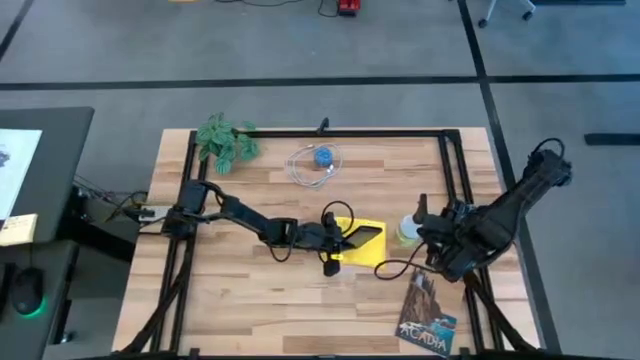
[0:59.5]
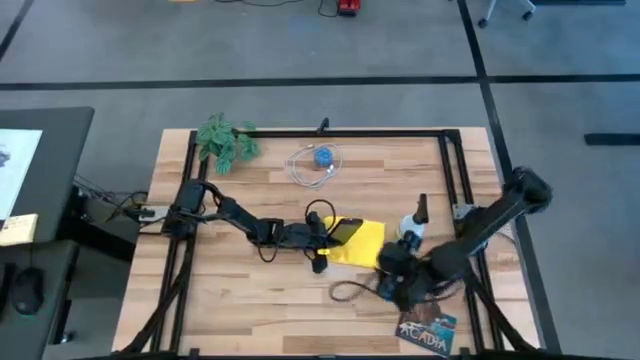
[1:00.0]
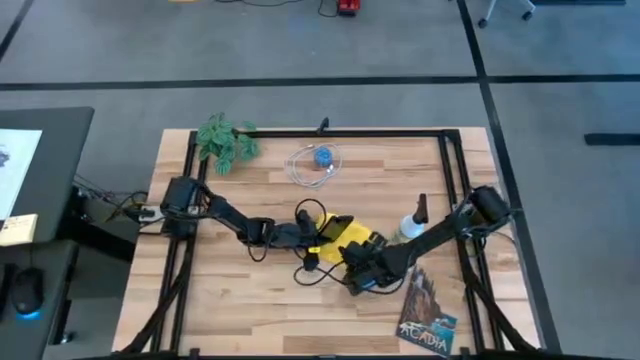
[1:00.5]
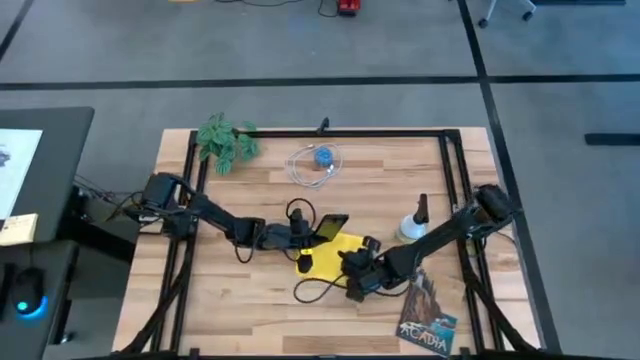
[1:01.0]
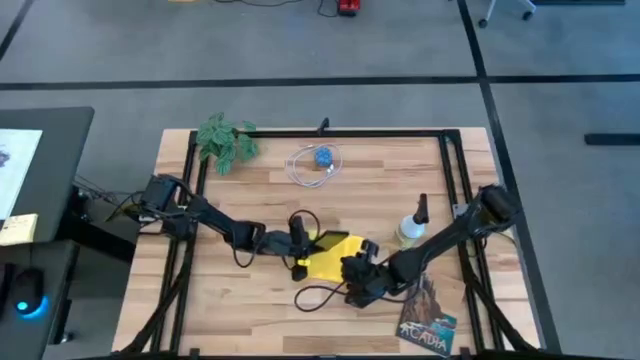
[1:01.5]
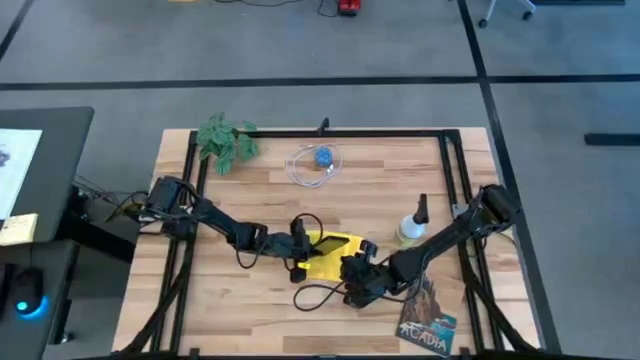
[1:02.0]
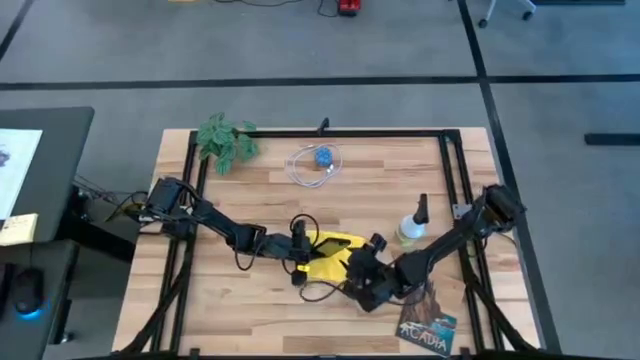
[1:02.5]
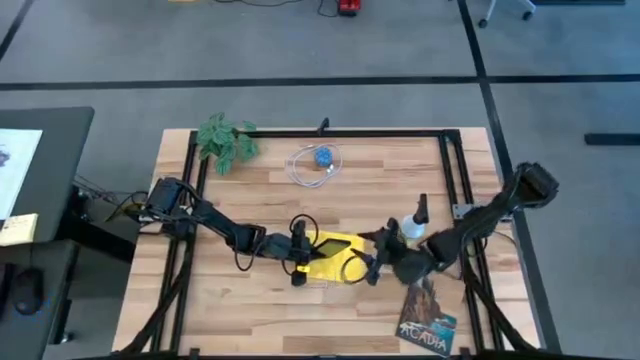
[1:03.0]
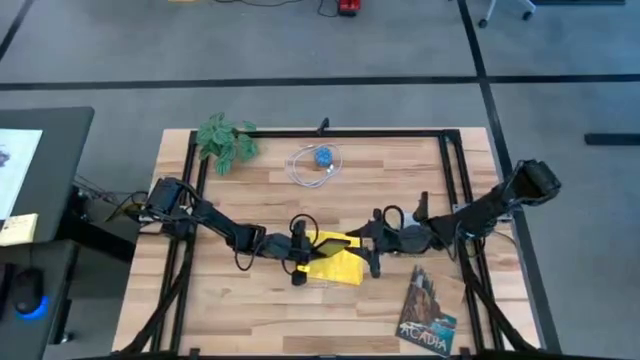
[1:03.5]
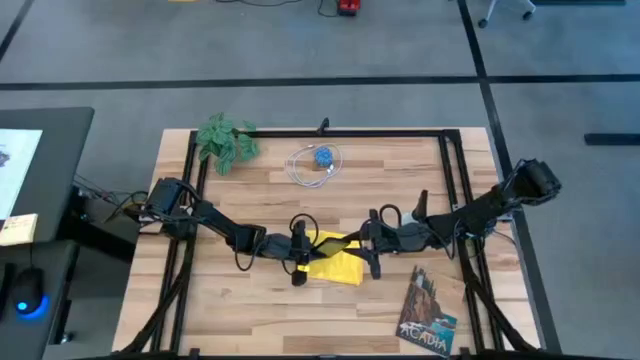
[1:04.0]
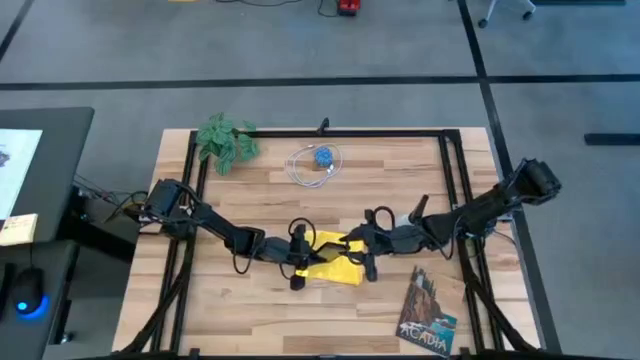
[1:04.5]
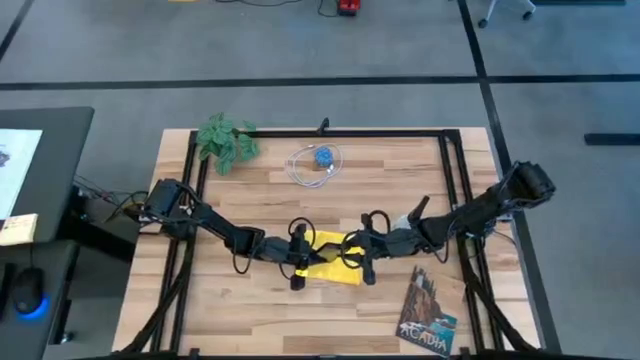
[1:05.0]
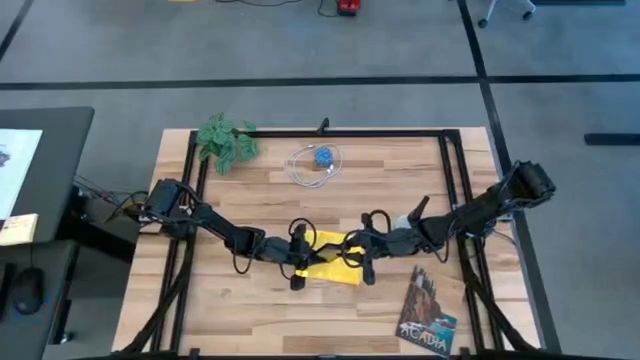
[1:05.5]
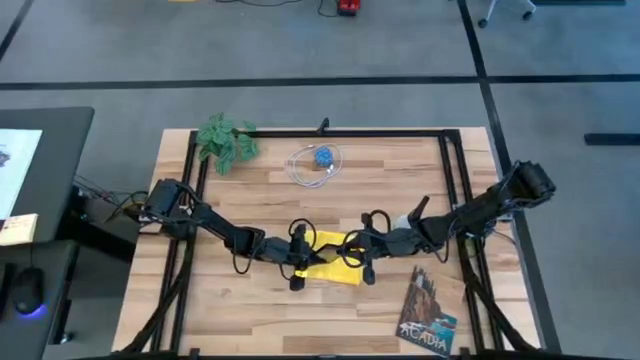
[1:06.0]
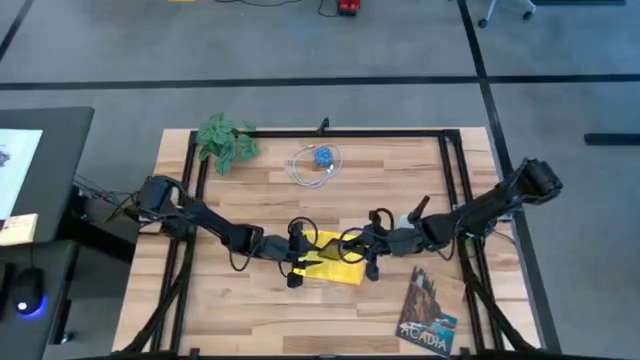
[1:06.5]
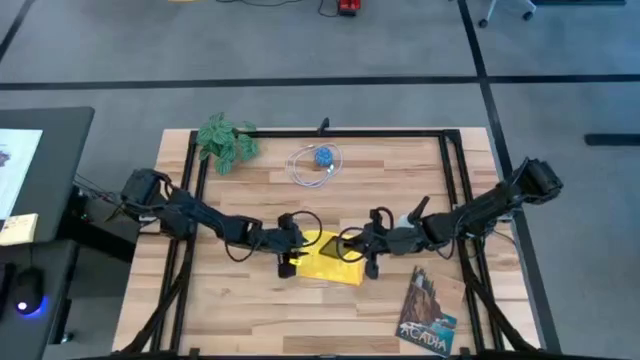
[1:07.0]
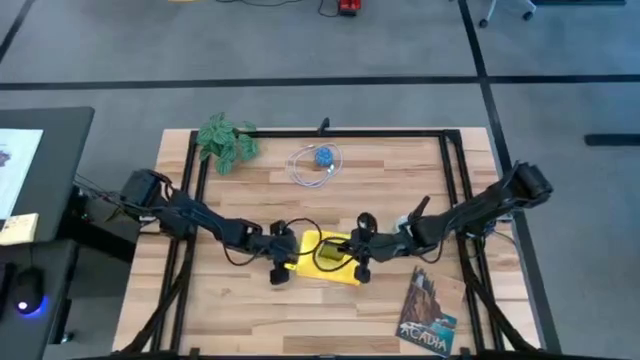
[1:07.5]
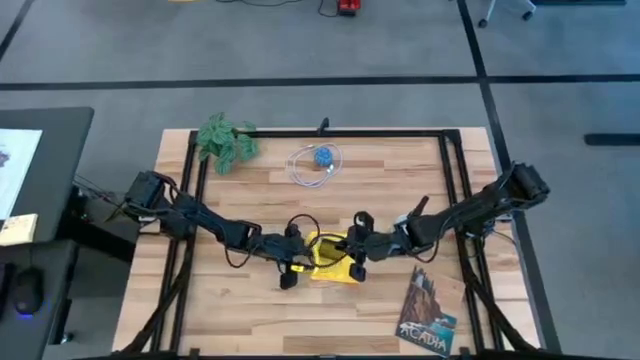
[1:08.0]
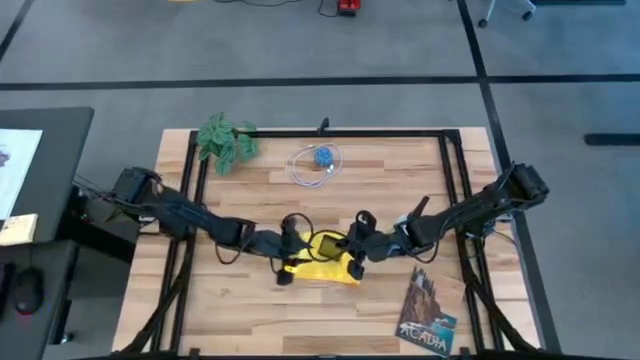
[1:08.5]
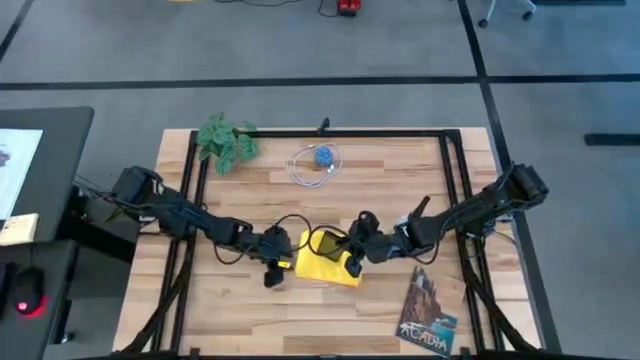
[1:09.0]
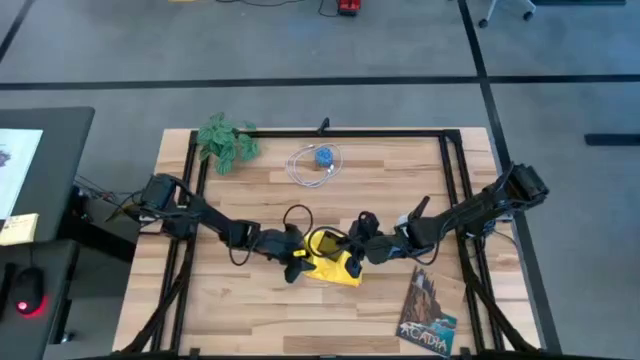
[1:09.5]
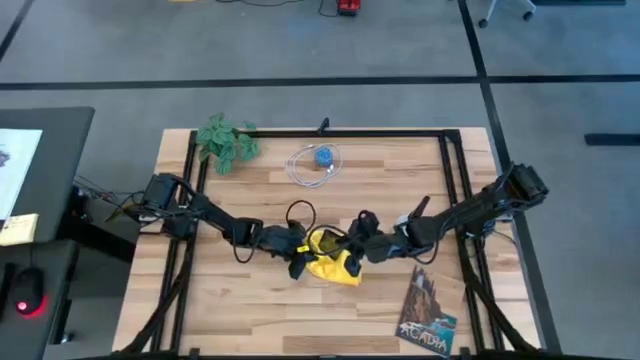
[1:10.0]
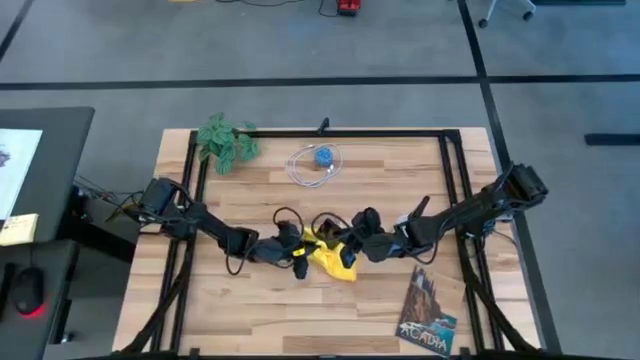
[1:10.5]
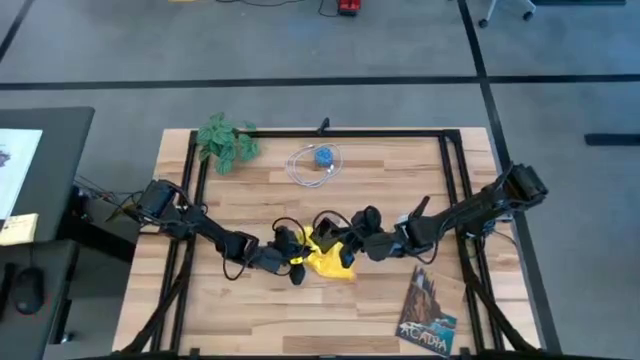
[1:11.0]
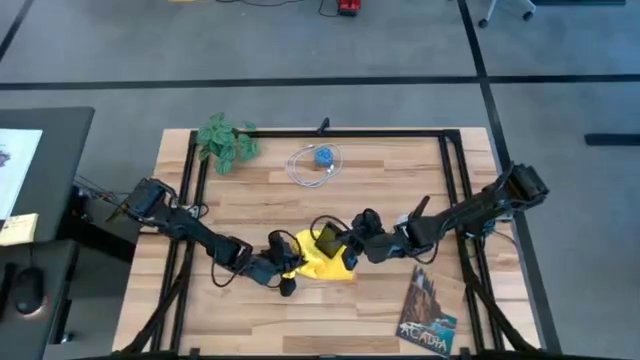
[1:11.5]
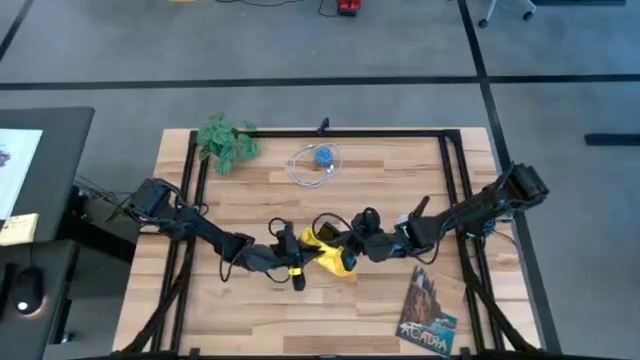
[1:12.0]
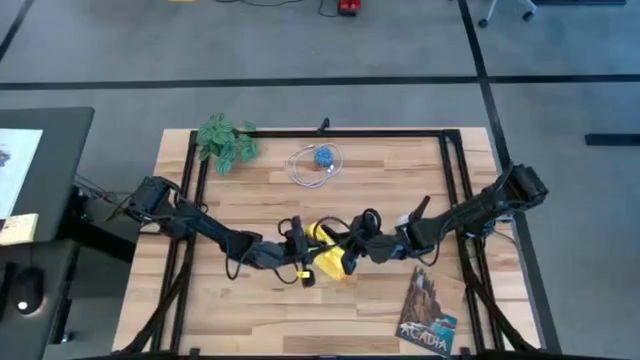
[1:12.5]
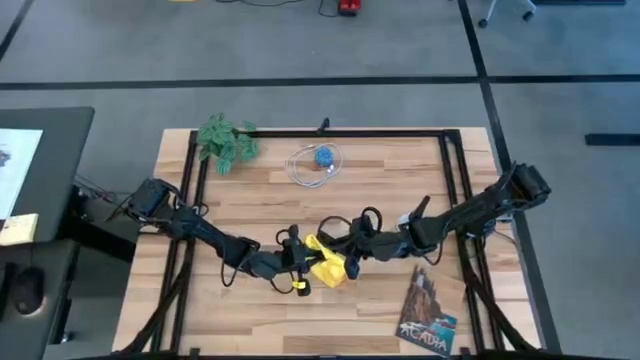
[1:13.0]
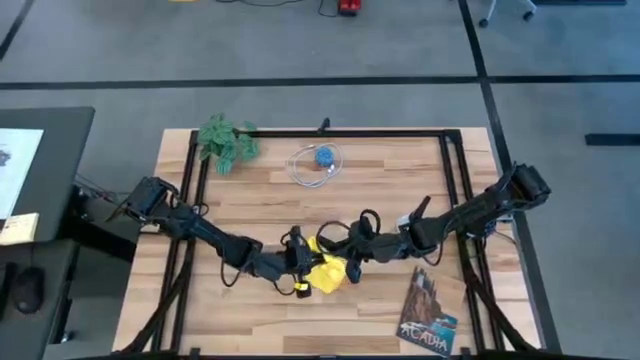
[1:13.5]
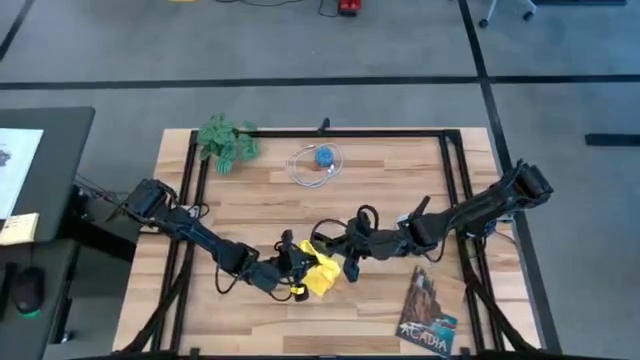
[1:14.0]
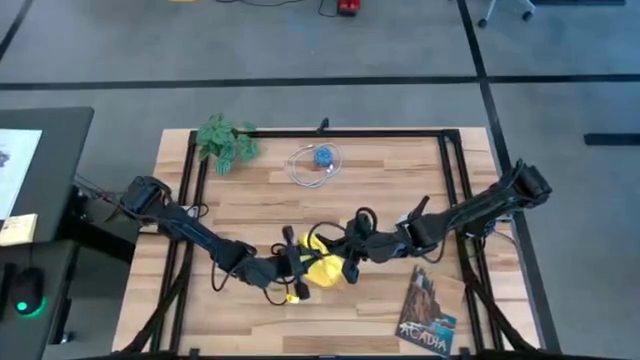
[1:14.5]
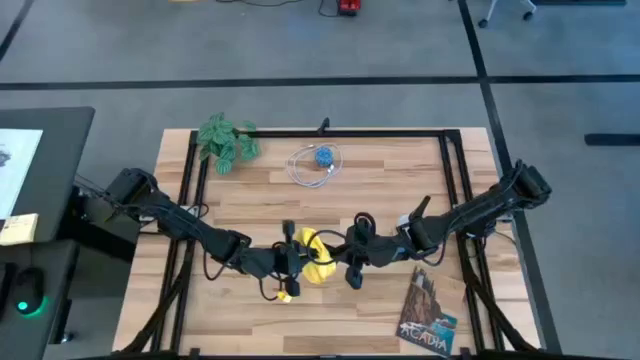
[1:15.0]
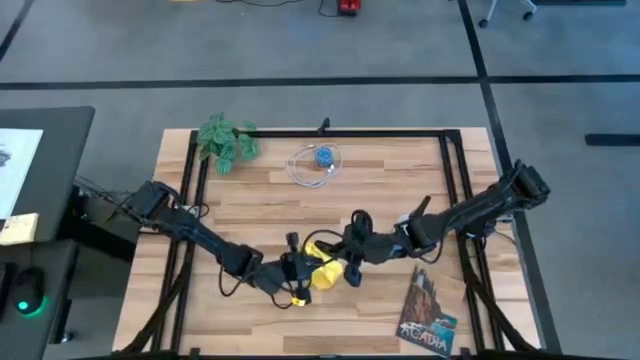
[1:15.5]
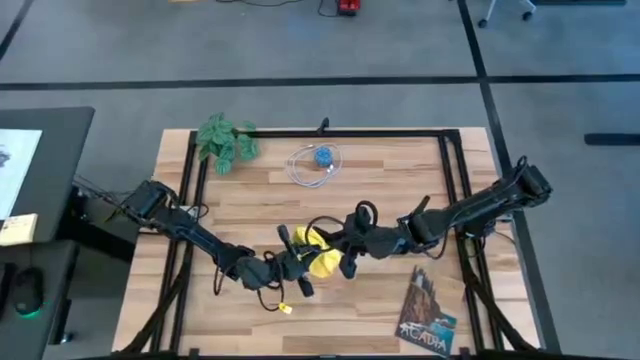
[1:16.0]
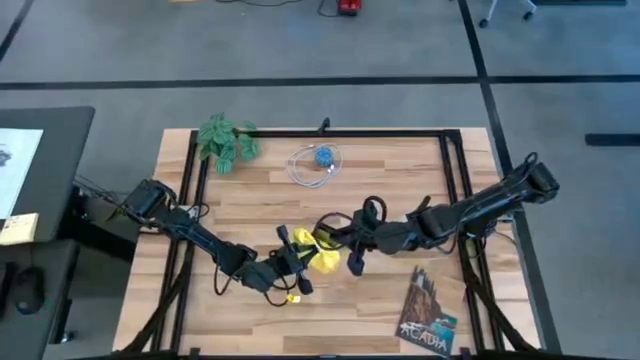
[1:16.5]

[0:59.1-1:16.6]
Task: Apply microfiber cloth
Wipe the front of the cellphone using a microfiber cloth
